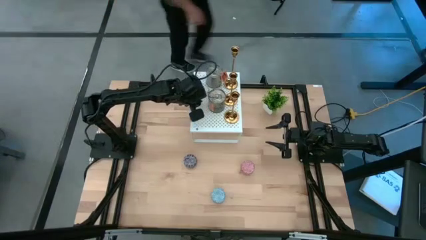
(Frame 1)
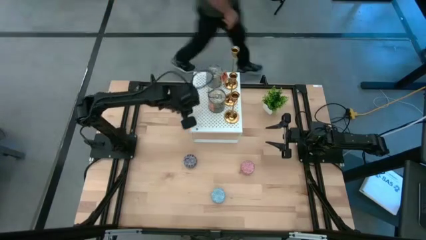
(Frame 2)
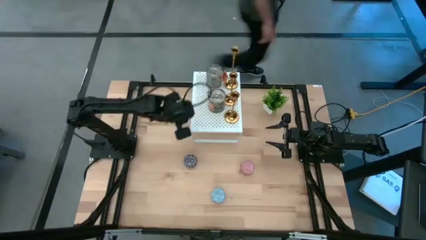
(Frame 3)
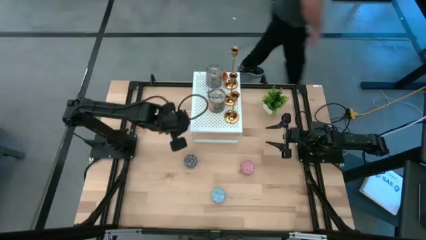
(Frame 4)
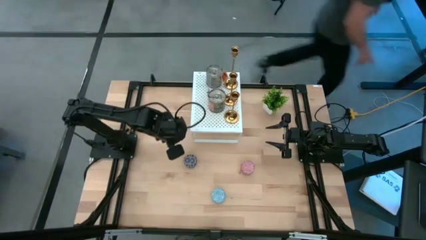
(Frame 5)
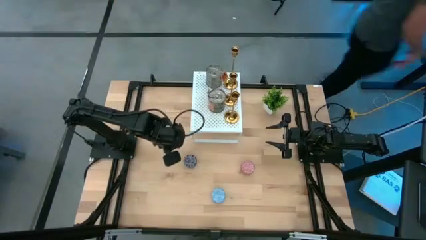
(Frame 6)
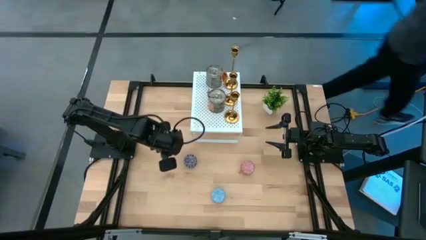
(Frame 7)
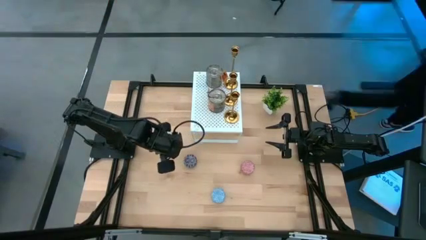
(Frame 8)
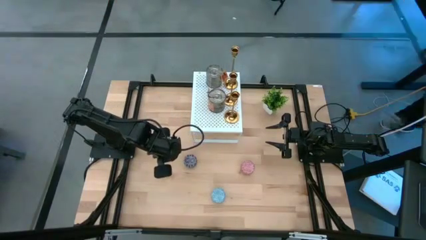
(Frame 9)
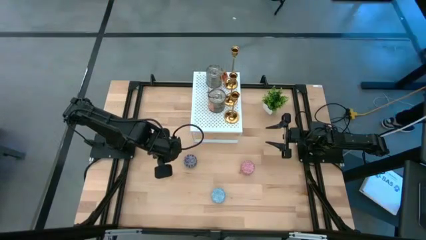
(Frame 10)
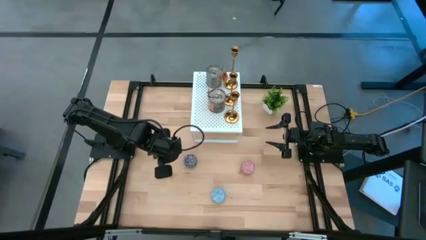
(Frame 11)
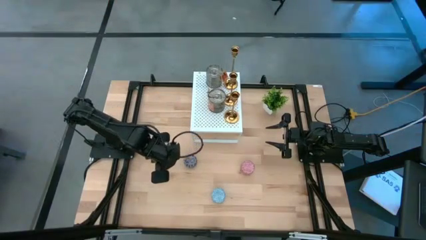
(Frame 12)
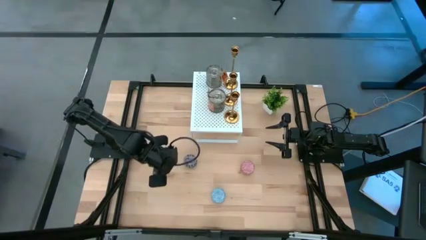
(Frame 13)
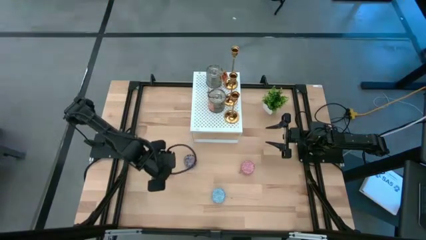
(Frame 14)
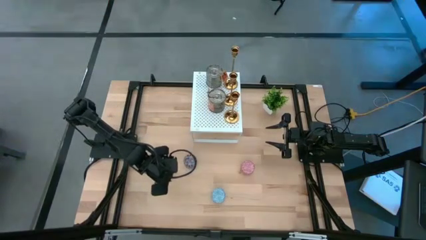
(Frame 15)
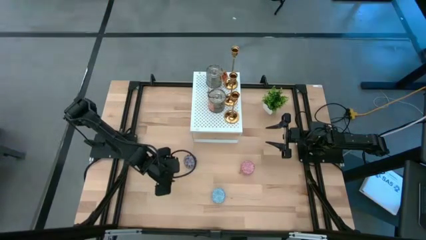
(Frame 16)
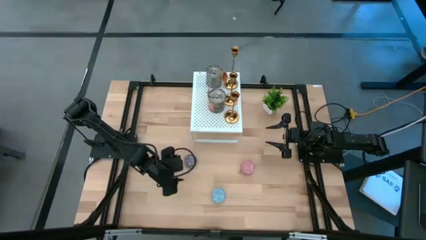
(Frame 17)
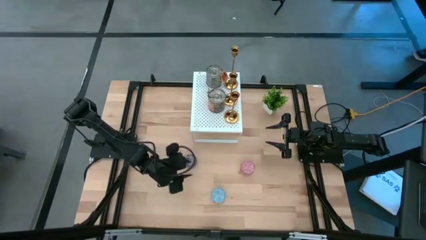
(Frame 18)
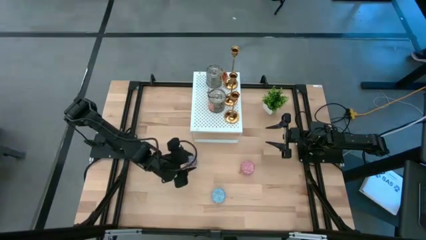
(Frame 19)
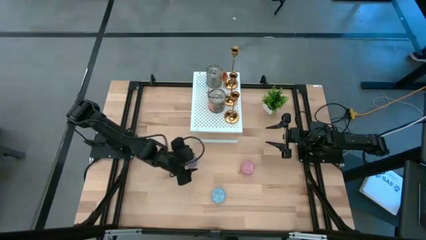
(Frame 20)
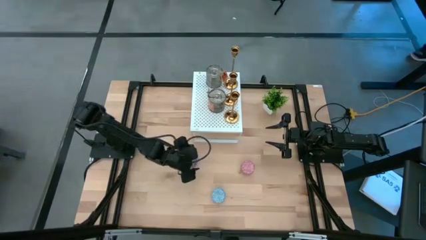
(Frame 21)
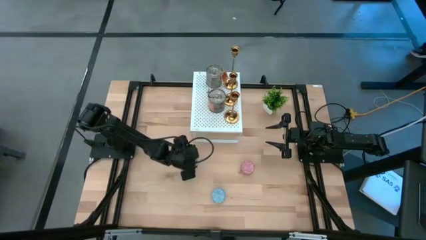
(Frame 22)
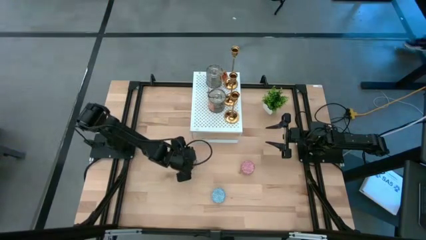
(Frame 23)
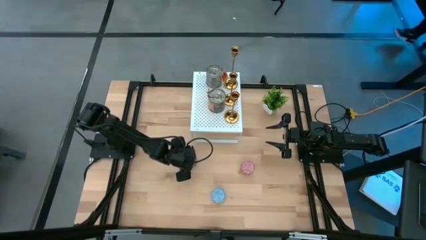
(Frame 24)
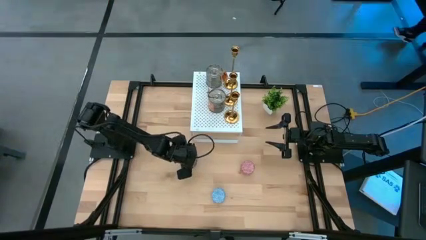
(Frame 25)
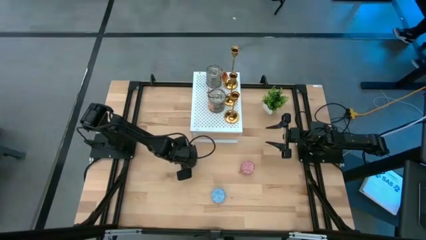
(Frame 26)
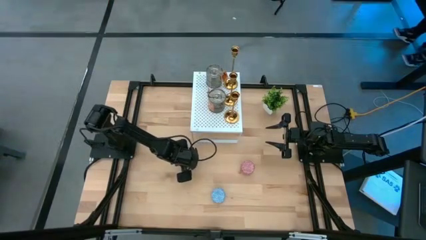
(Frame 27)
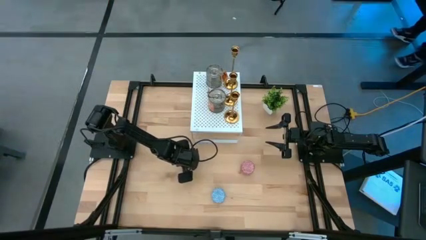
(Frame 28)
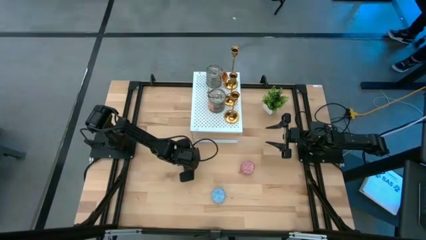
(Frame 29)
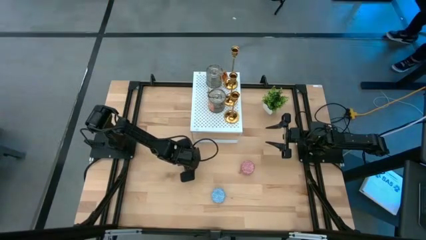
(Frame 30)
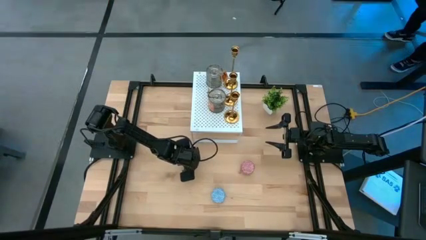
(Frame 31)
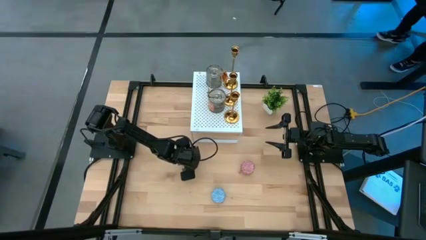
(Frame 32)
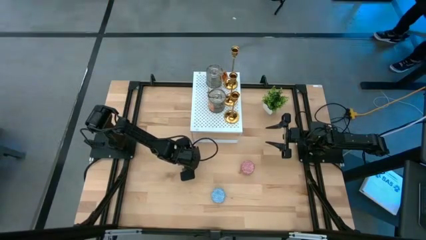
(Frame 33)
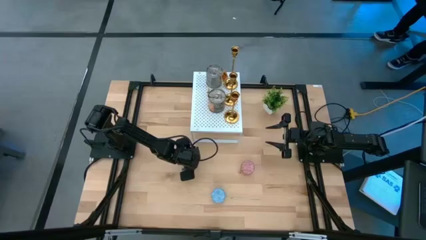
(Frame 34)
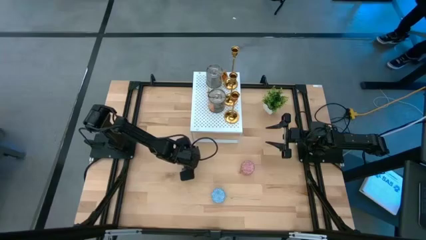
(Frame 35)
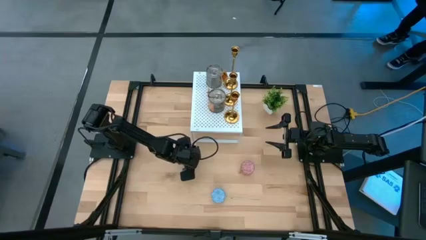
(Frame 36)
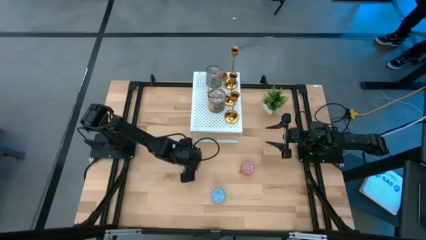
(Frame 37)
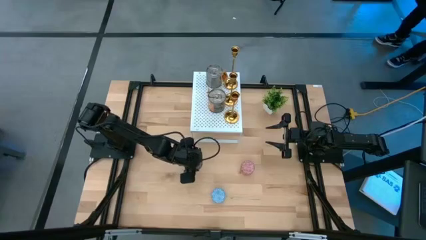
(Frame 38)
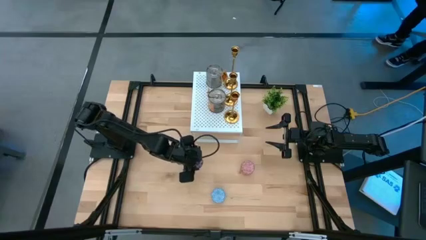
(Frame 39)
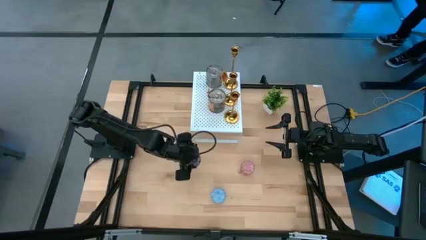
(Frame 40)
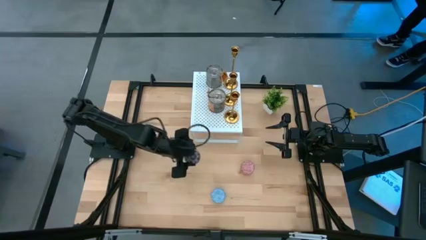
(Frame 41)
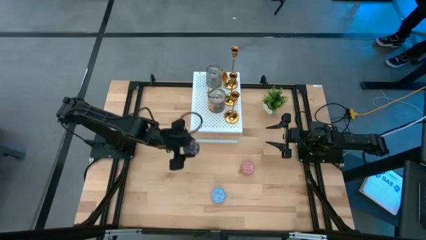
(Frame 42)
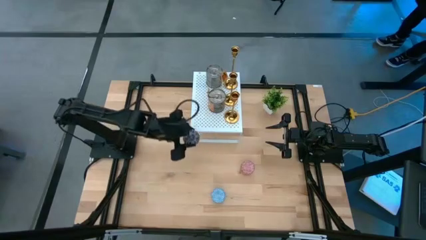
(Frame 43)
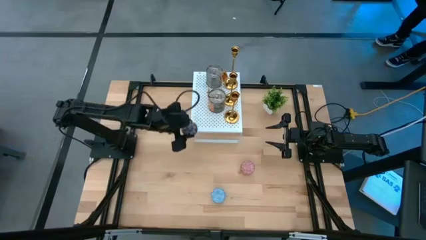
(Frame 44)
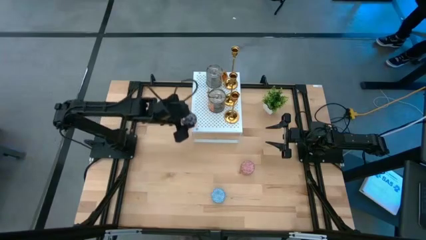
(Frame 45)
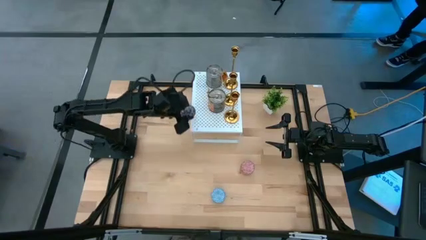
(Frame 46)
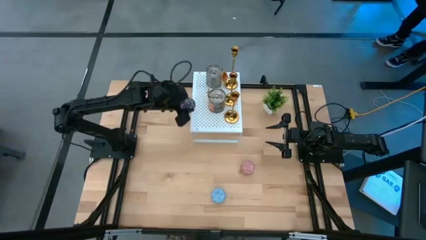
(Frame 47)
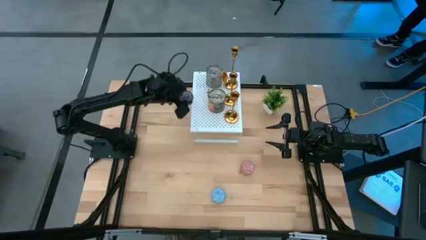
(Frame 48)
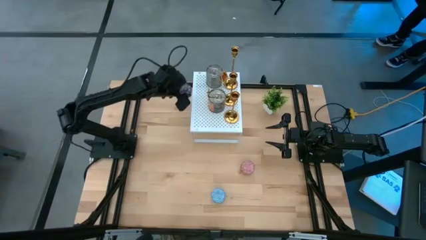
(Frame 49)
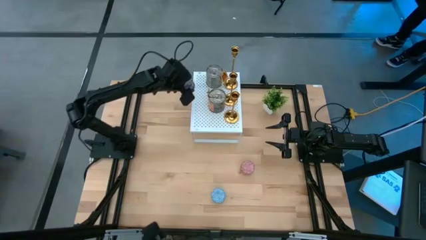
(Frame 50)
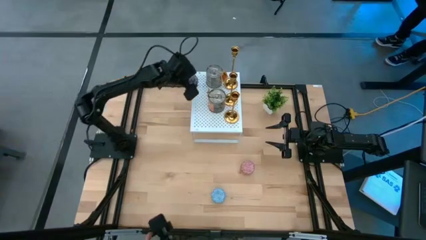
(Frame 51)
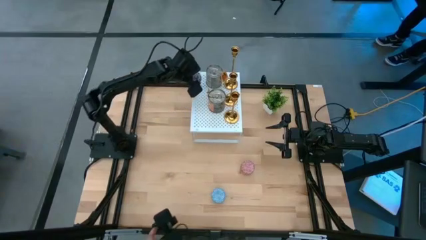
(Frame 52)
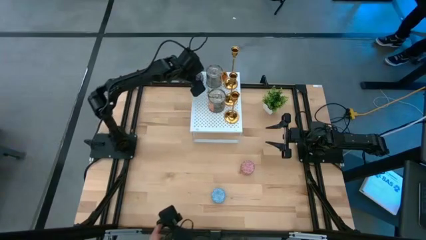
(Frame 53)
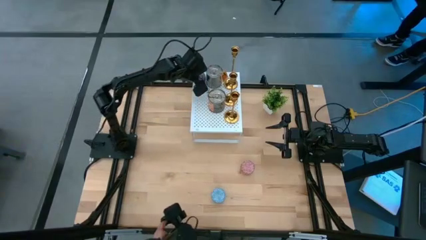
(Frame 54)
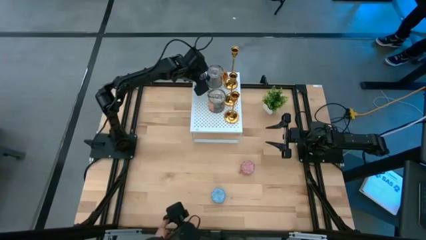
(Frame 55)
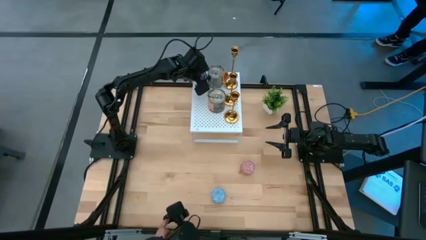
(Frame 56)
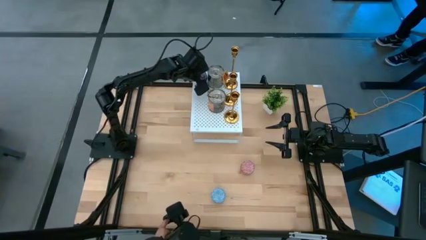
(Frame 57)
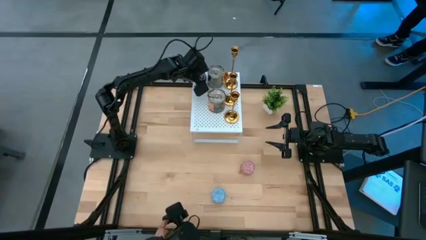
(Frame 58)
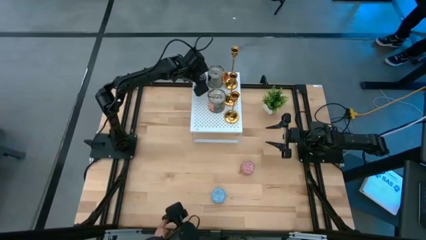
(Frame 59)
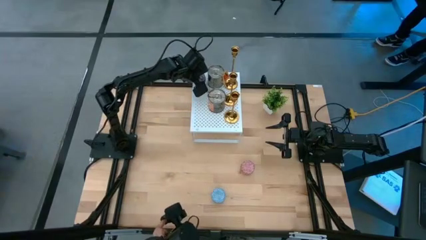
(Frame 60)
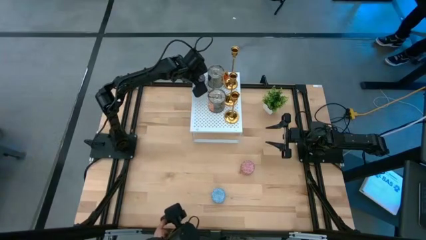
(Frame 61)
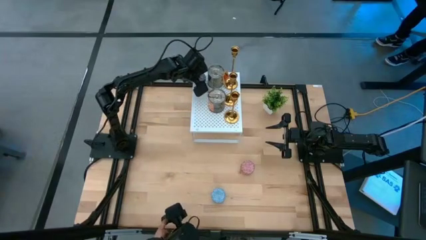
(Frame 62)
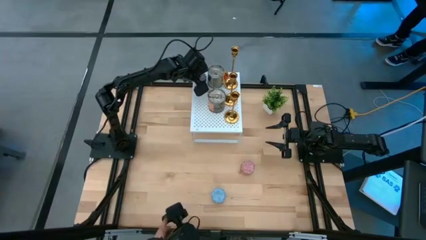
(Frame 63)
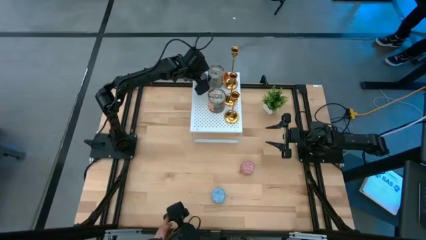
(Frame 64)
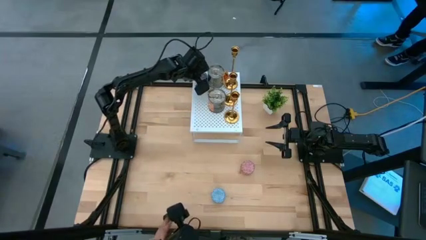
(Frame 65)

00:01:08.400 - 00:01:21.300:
Task: Pick & Place candle stick holders
Put the red patterned scented candle on the shelf

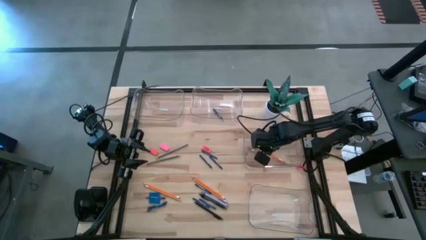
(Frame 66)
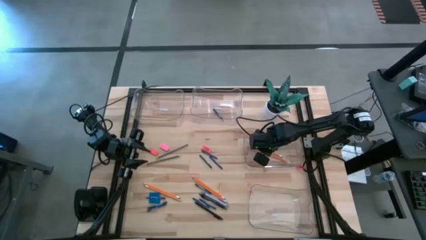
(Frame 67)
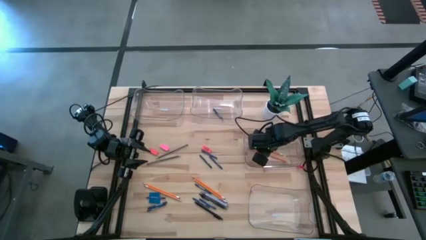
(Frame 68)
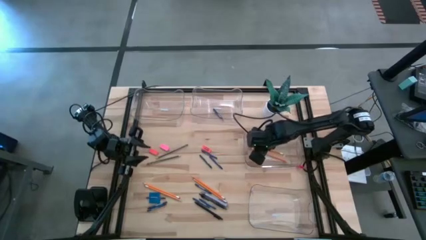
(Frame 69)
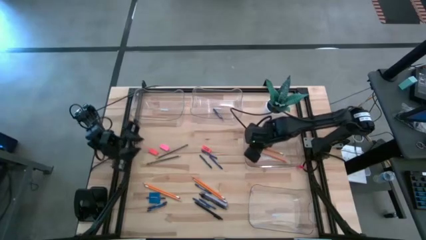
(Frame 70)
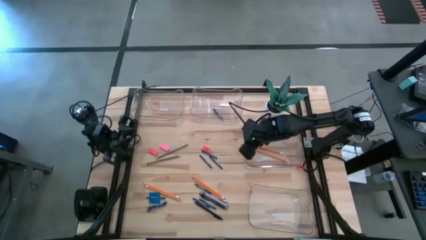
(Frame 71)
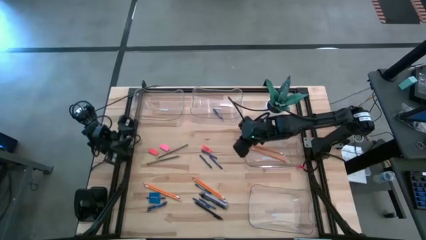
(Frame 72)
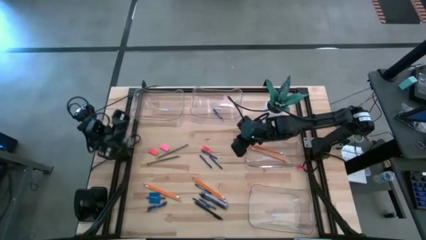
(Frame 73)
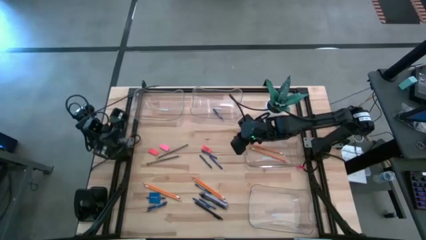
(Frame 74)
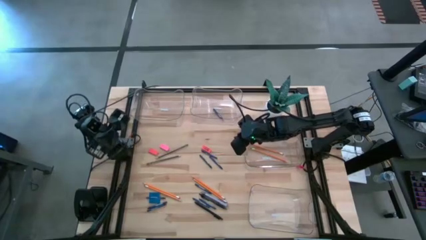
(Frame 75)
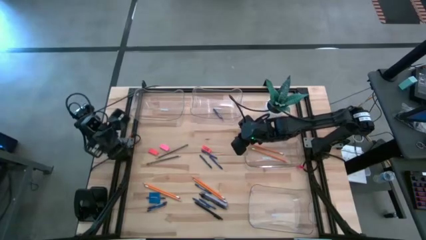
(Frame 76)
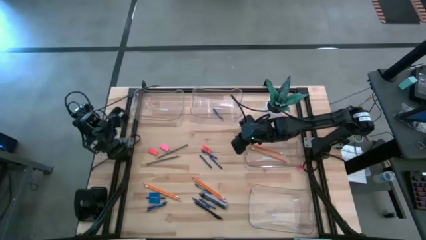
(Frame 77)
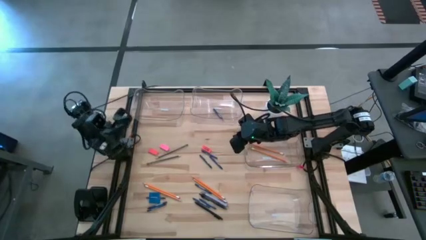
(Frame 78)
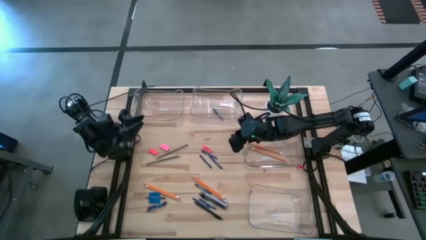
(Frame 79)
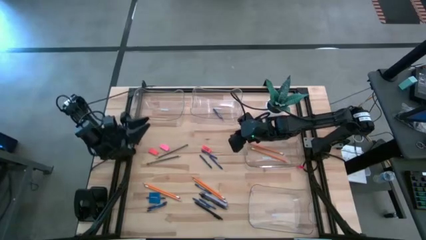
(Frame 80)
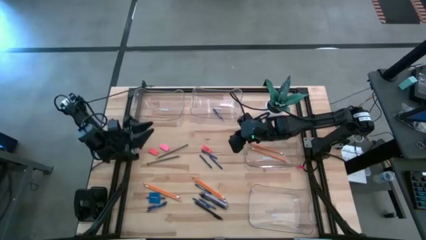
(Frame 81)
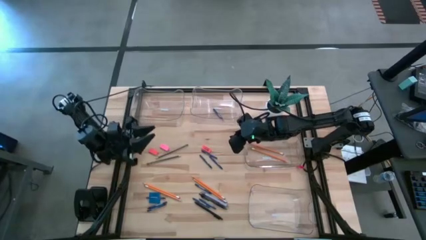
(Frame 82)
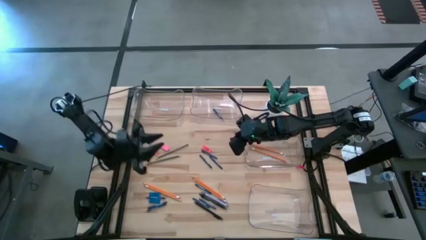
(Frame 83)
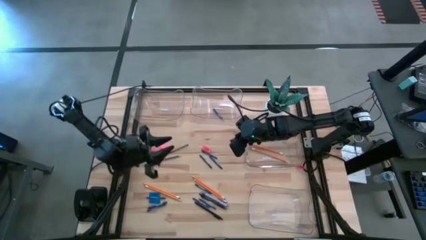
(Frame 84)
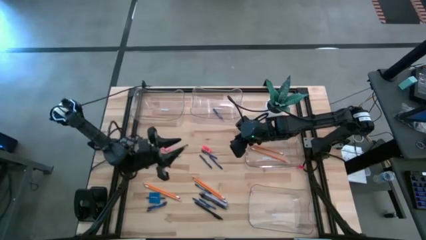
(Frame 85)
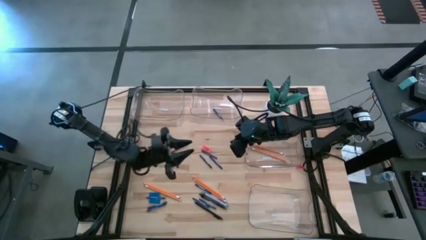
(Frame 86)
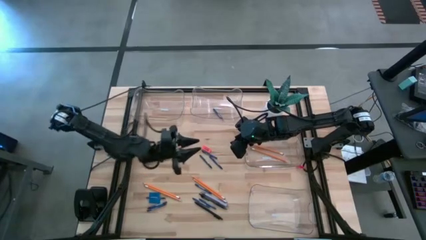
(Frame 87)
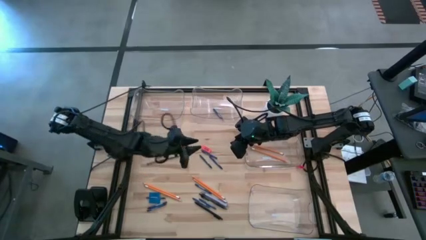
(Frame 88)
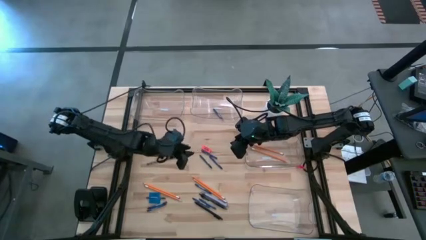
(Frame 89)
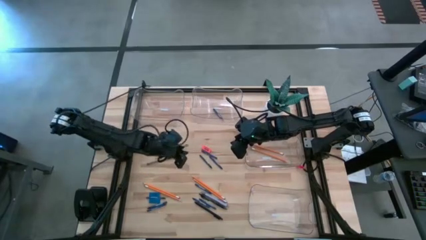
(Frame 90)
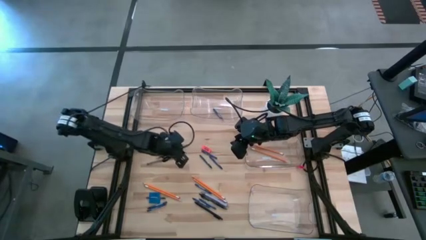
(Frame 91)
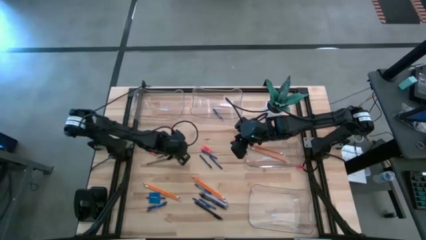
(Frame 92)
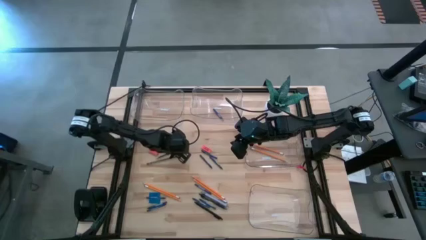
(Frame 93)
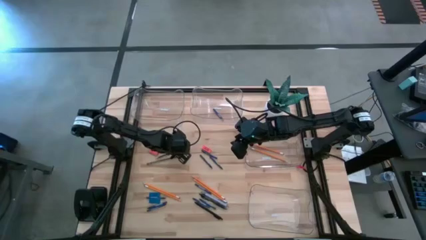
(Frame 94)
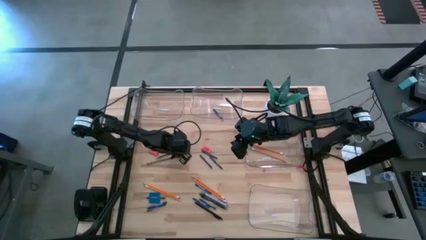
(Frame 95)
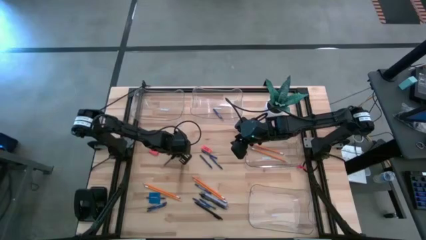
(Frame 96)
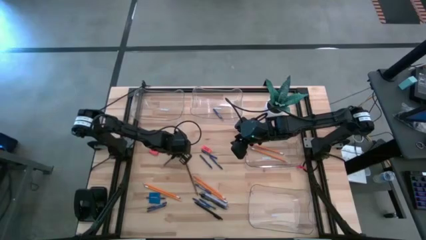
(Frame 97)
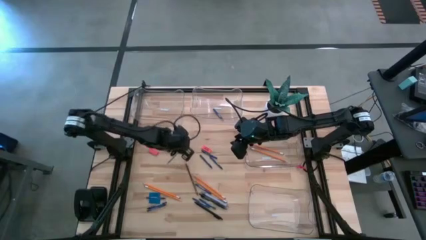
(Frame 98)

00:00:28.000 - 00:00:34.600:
Task: Sort crayons/erasers/pens/pencils in bins
Put the black pencil into the middle transparent bin
